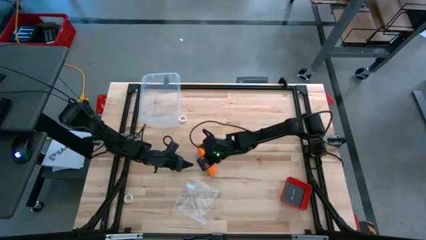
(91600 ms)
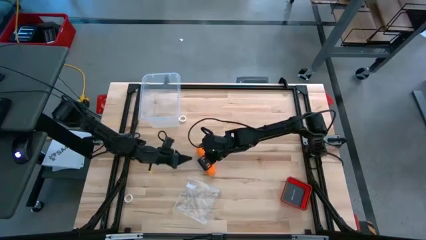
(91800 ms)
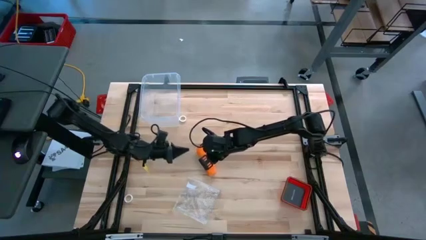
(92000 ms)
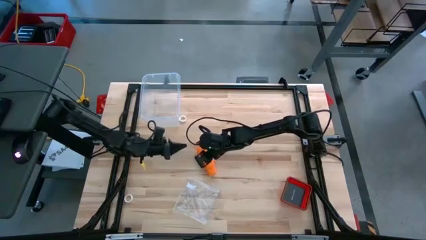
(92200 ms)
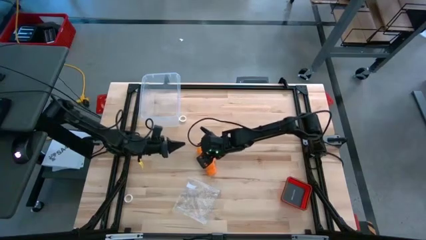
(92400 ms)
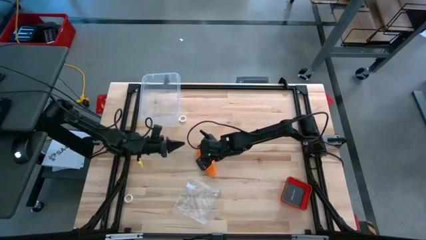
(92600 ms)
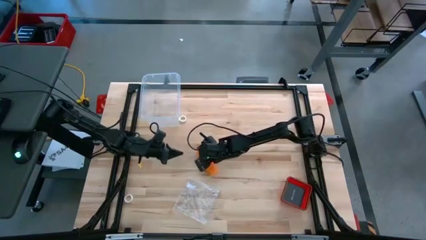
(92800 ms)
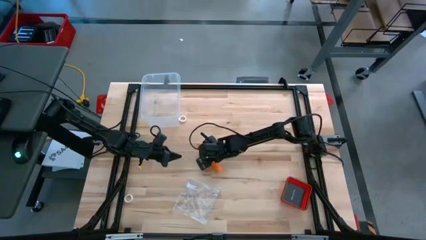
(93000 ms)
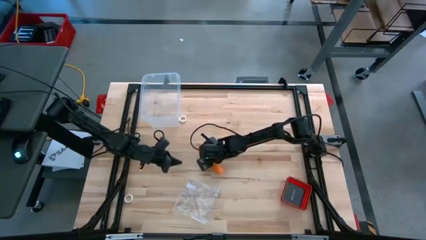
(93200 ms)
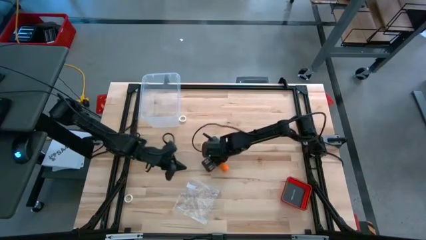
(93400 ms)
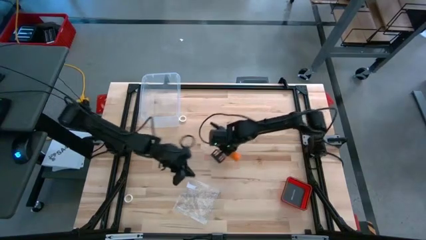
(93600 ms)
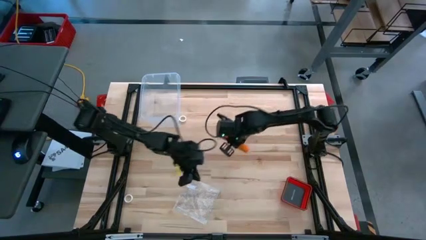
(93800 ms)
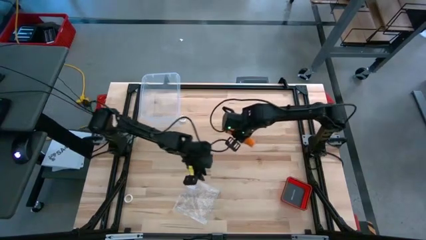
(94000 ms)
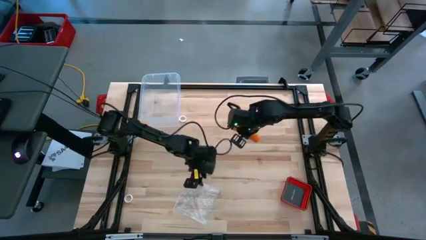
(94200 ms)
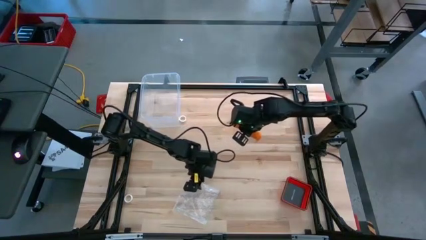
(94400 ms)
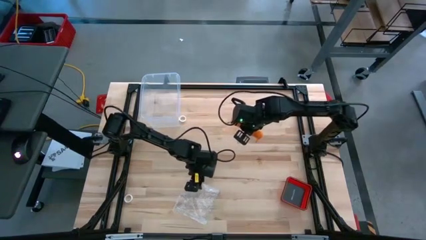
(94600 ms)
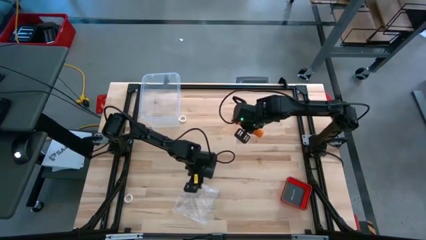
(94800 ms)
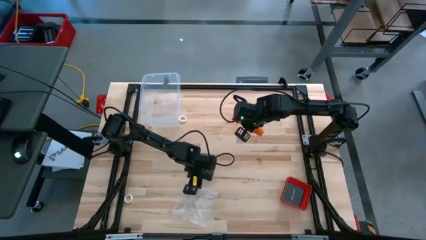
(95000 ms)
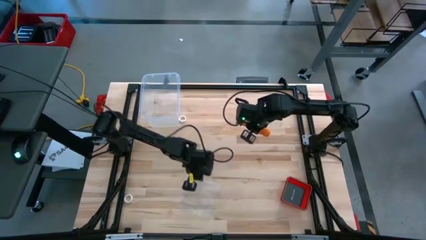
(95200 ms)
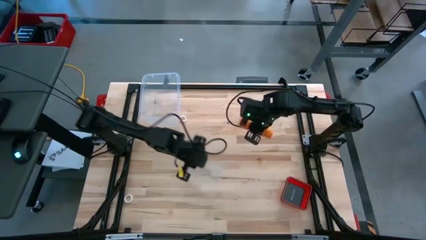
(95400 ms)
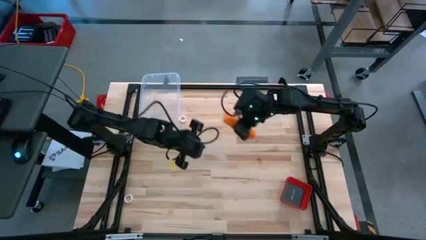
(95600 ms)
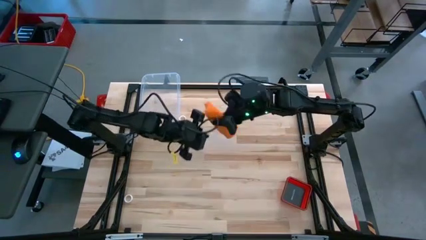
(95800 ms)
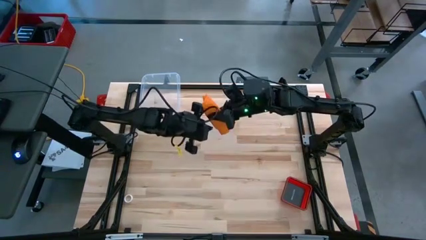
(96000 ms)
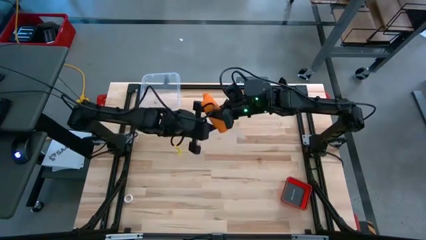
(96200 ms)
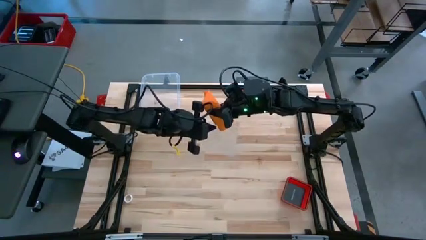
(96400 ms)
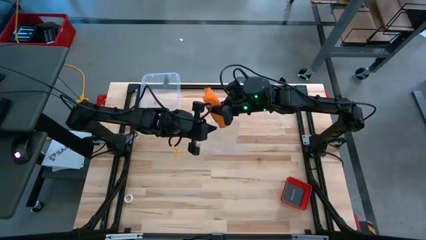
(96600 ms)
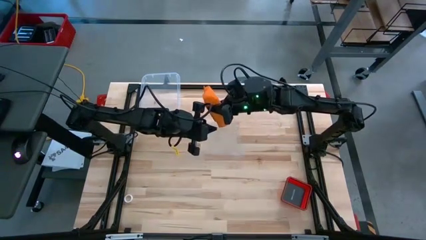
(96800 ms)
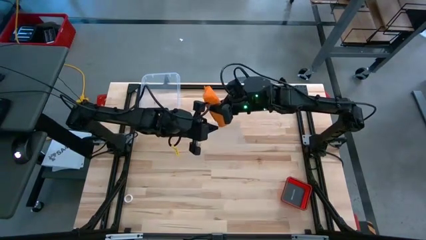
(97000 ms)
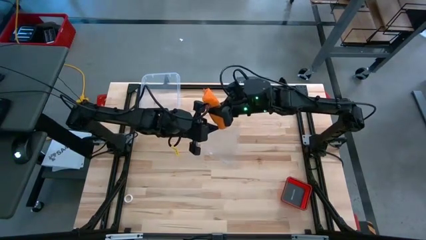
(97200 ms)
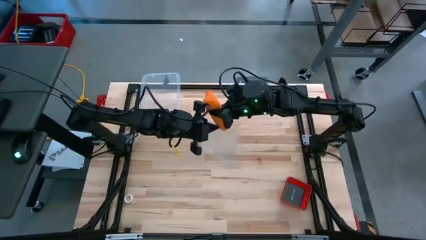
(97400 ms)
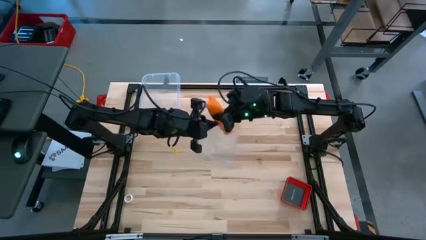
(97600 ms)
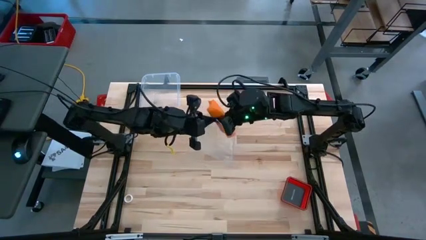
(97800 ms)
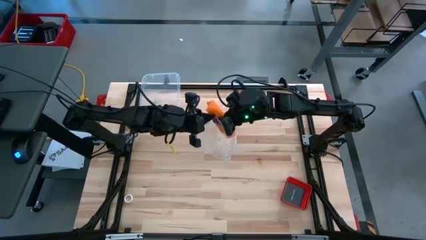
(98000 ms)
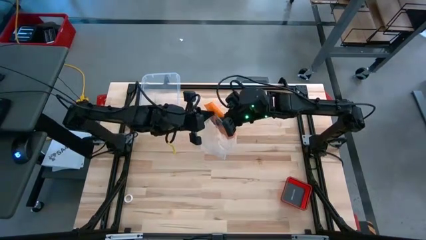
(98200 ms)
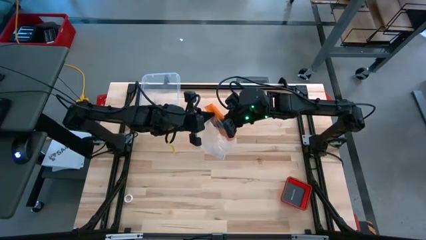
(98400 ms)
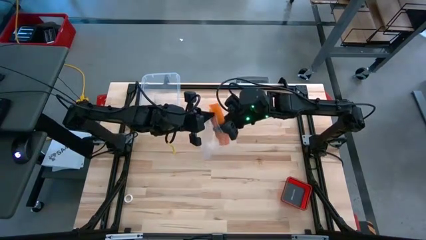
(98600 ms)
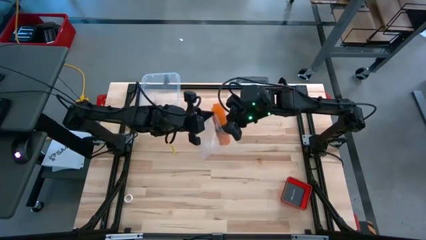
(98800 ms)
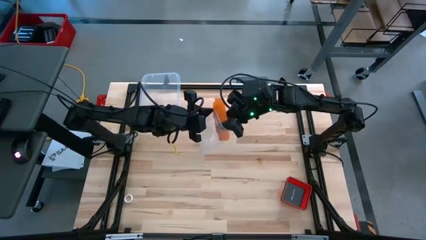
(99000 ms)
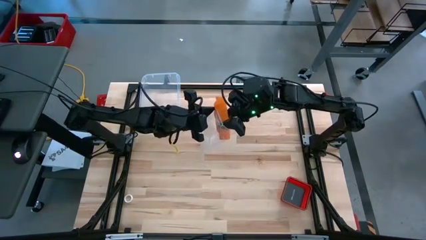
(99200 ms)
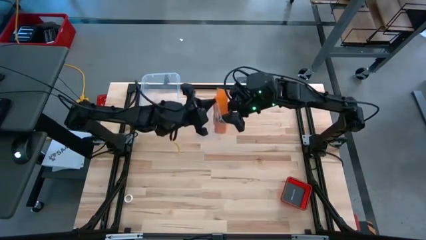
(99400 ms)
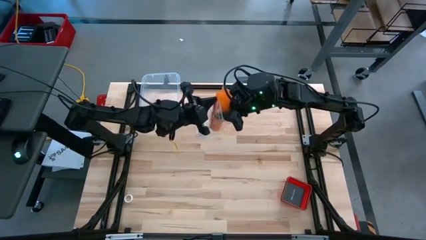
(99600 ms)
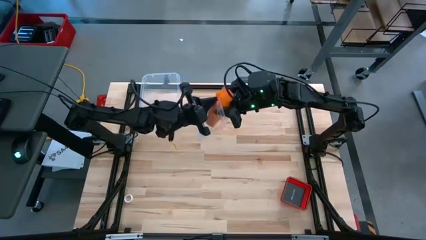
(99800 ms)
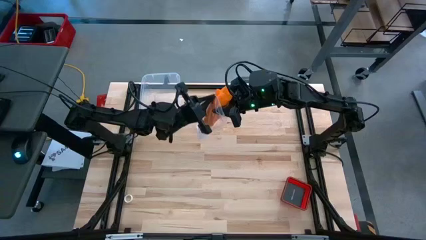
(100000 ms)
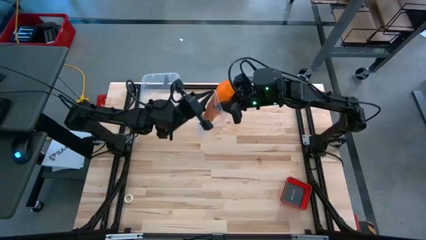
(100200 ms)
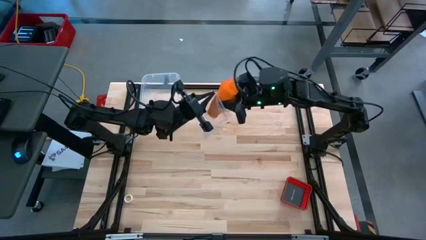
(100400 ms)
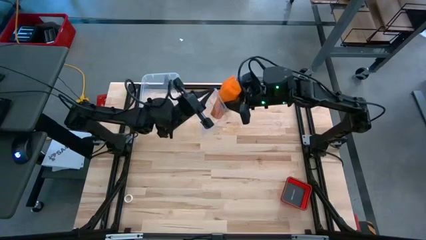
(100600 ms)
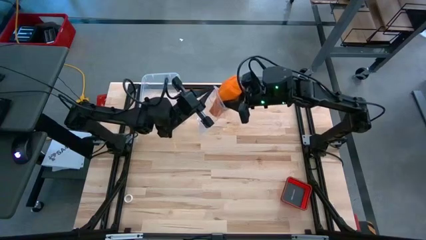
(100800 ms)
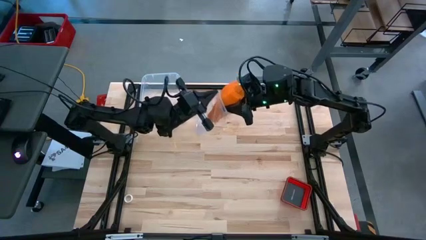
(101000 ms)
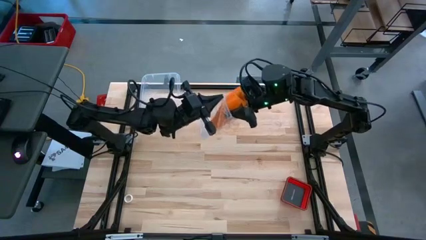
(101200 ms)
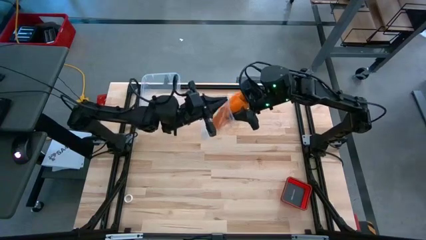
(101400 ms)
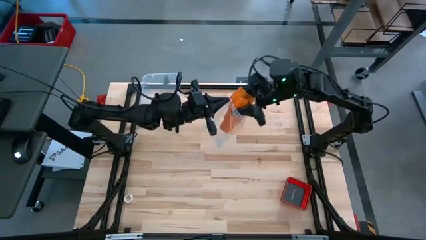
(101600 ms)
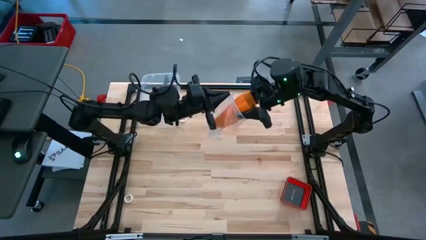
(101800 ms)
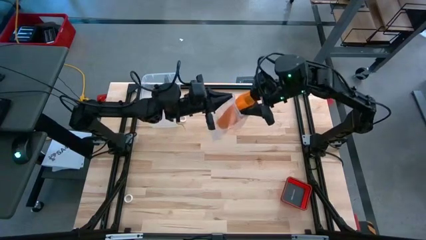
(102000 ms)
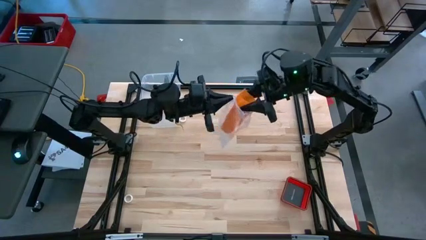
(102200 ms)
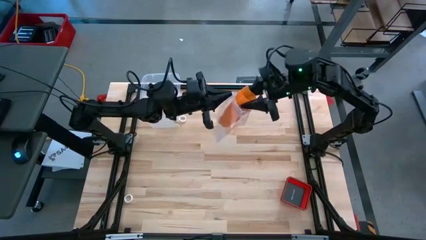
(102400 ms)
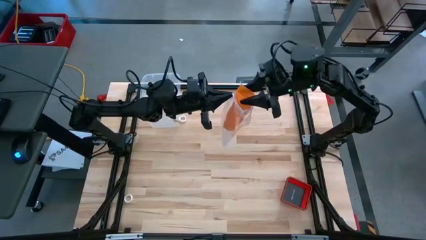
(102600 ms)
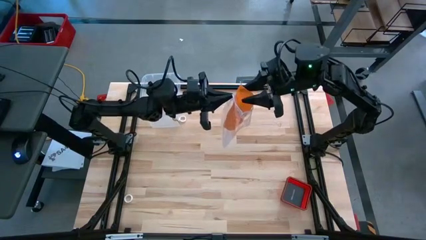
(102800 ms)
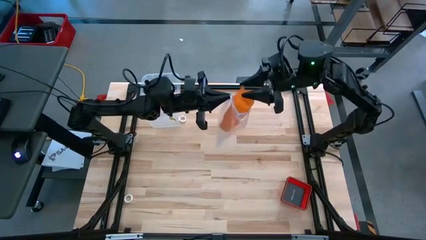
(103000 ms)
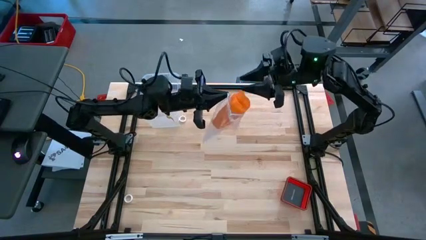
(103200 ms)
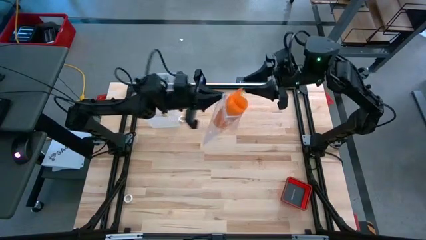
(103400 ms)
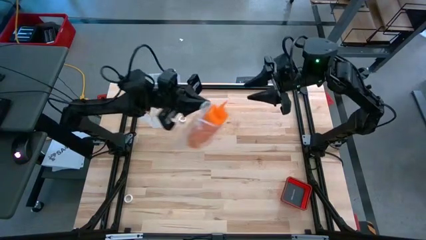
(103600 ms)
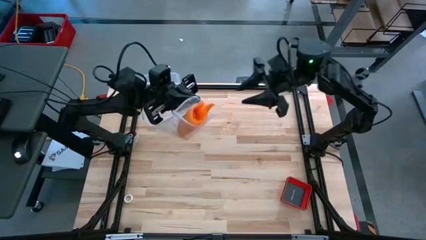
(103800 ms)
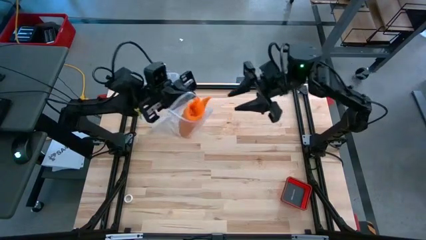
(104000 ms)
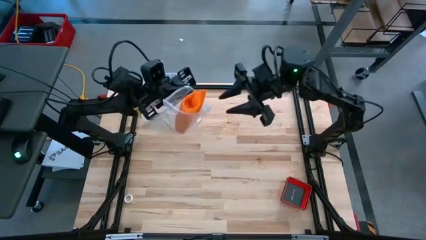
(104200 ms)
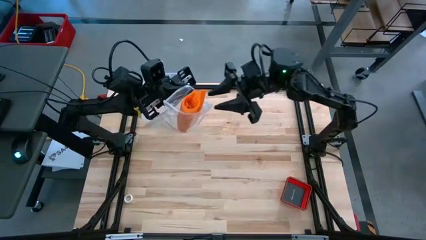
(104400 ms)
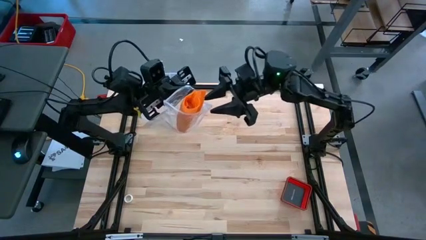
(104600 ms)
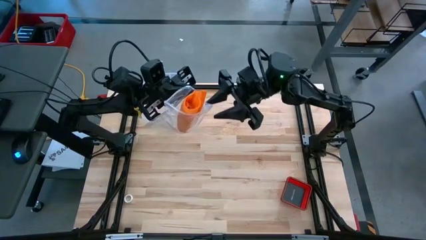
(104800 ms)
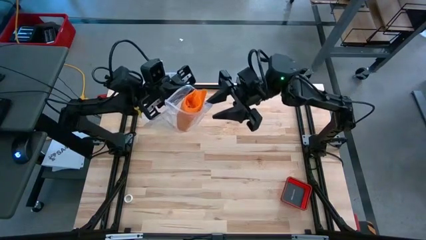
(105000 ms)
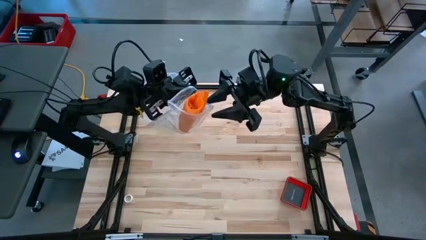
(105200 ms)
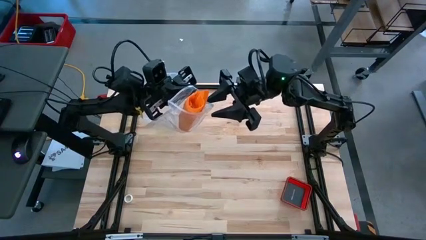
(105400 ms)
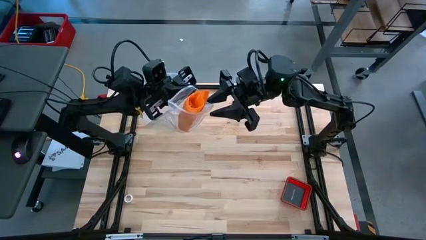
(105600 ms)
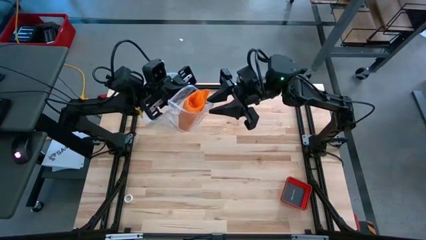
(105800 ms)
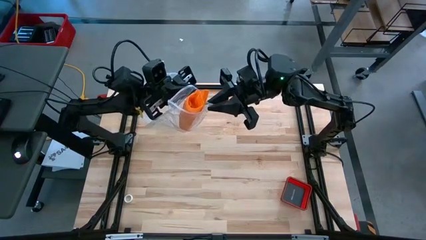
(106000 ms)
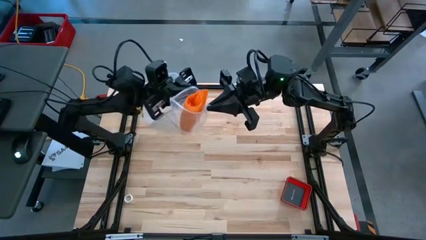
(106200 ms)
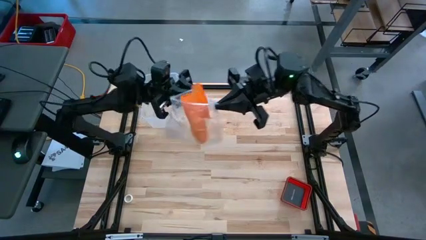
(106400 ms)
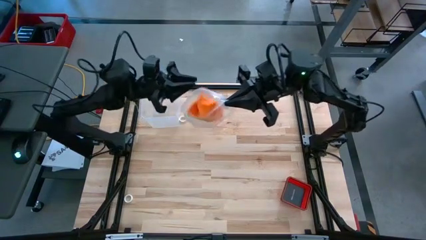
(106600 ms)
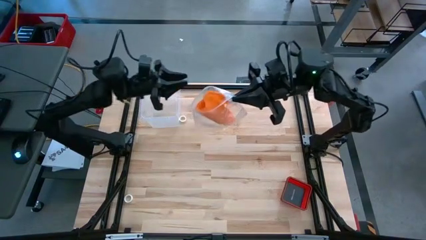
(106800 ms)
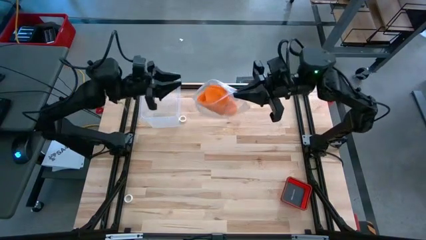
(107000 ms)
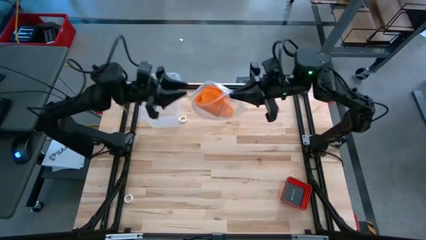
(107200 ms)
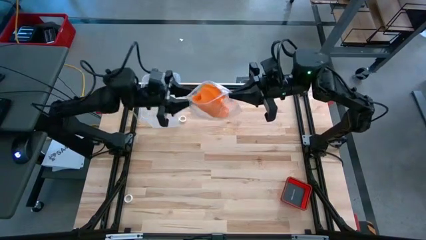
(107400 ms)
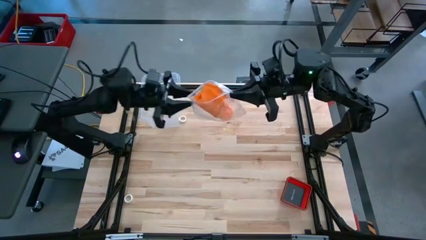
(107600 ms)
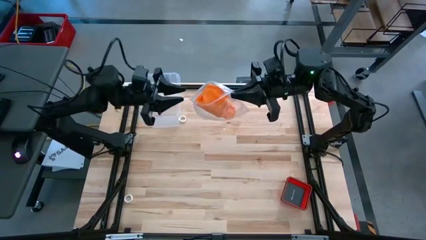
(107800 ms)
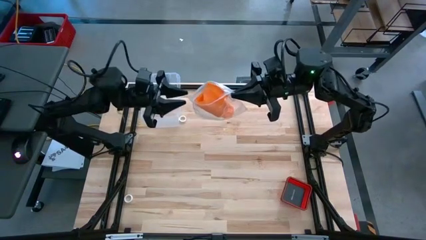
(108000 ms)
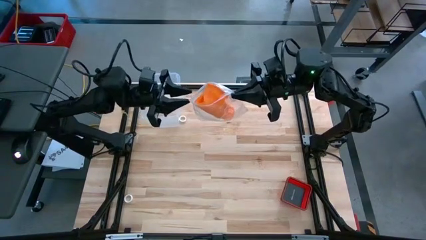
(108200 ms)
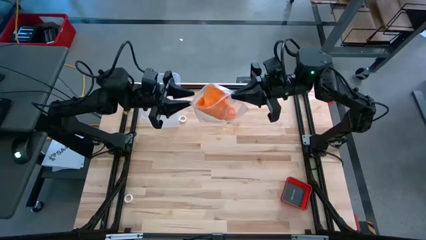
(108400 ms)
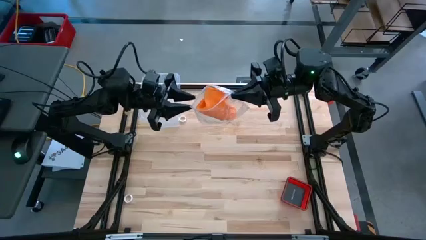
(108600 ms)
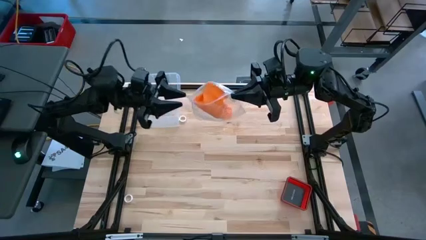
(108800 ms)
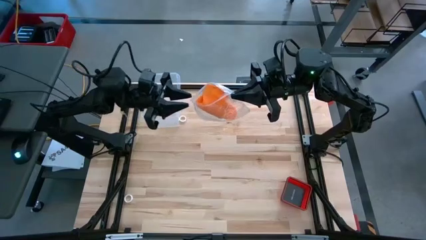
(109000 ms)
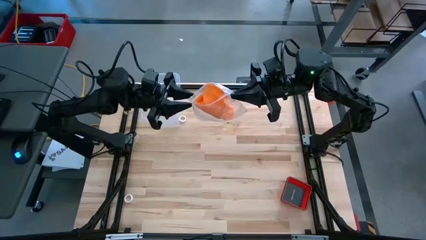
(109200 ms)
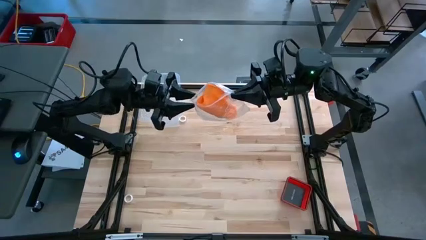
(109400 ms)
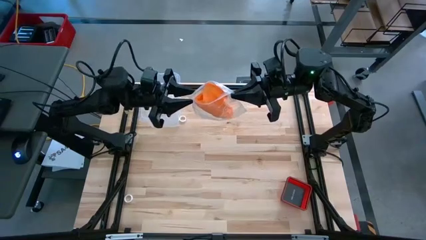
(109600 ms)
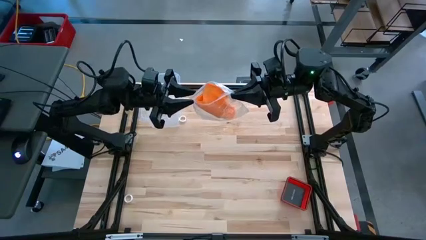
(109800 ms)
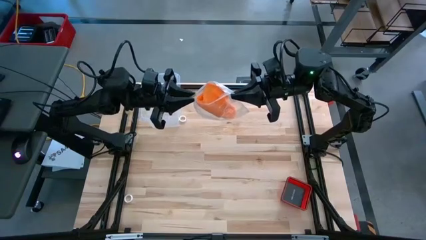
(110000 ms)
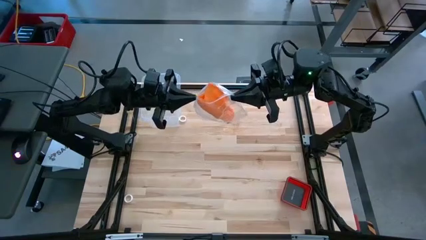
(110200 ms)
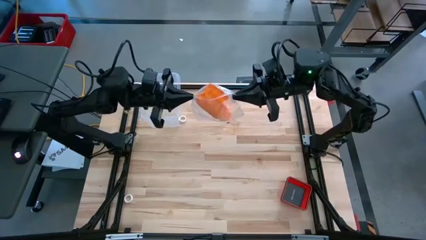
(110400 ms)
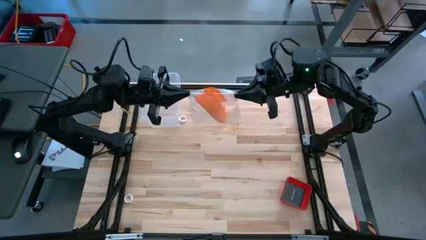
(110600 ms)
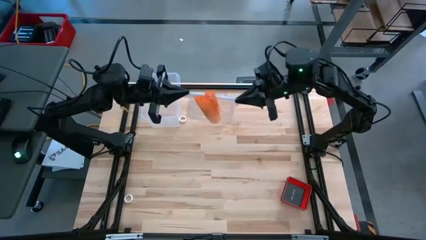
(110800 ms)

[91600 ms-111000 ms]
Task: Roll bandage
Put the rolled orange bandage into the zip bag
